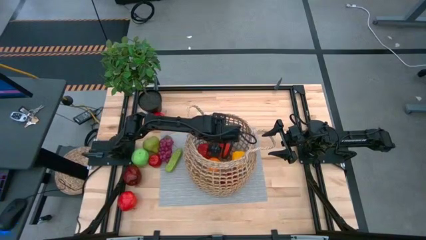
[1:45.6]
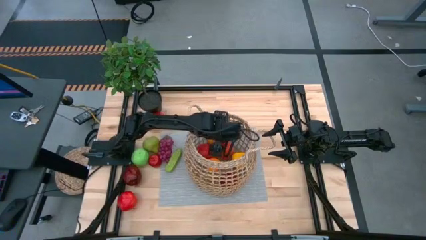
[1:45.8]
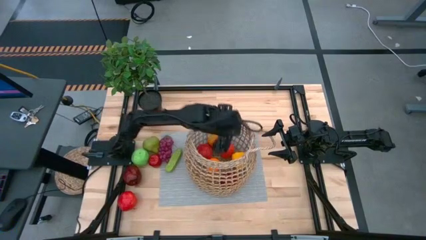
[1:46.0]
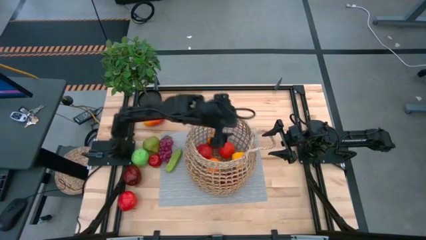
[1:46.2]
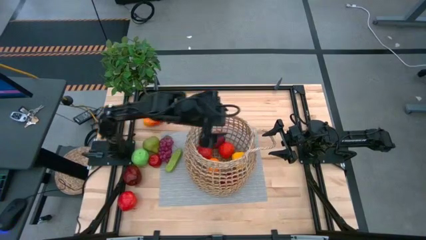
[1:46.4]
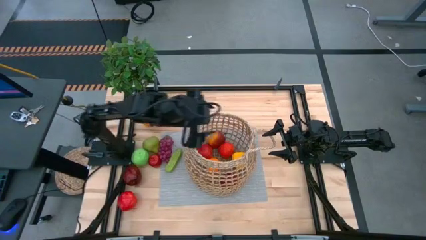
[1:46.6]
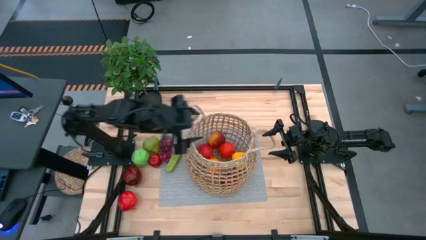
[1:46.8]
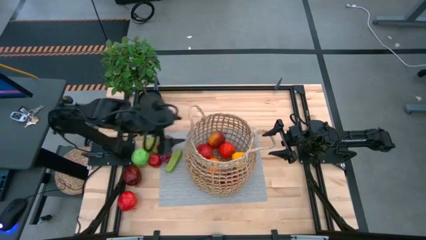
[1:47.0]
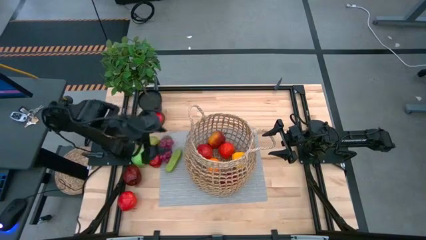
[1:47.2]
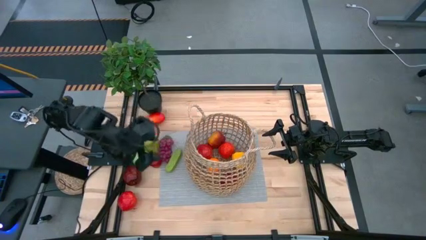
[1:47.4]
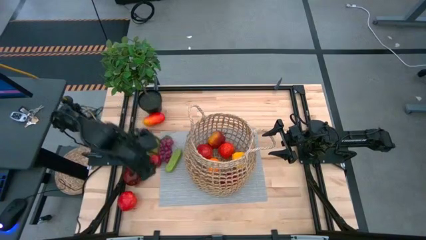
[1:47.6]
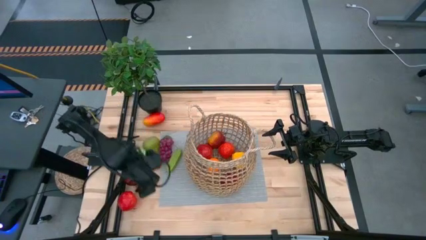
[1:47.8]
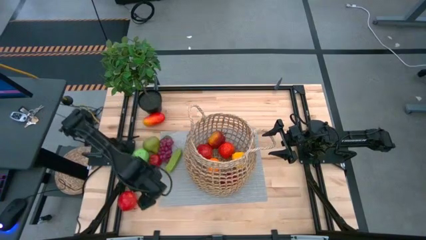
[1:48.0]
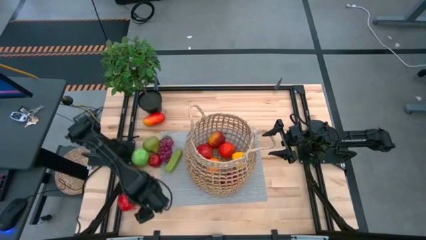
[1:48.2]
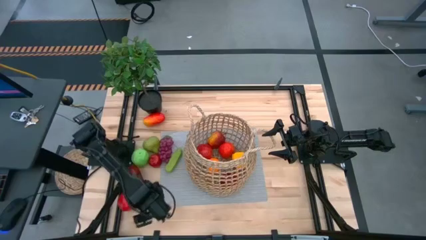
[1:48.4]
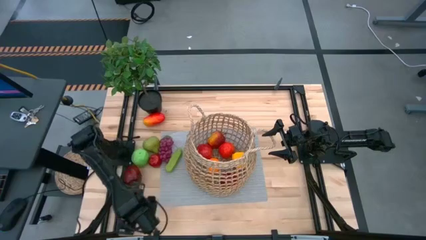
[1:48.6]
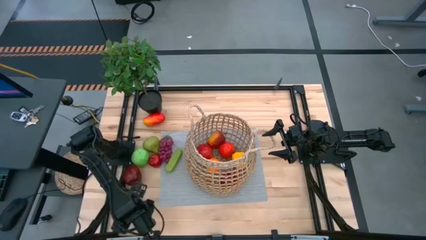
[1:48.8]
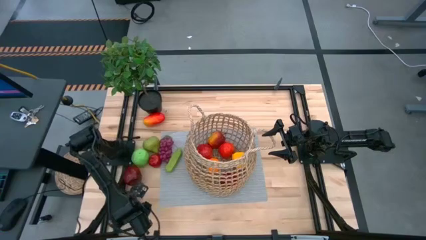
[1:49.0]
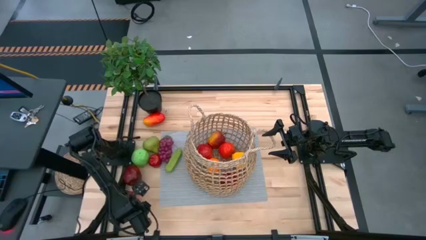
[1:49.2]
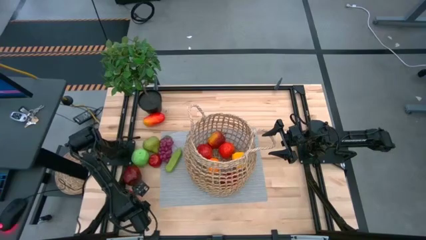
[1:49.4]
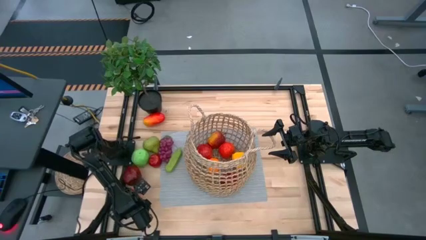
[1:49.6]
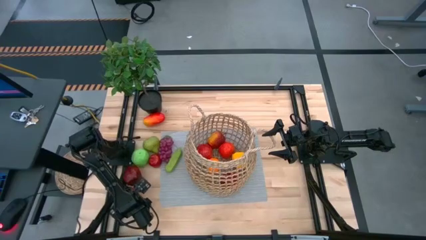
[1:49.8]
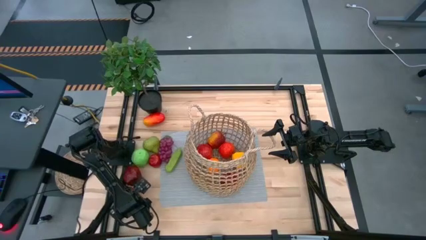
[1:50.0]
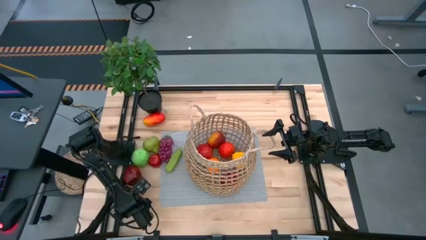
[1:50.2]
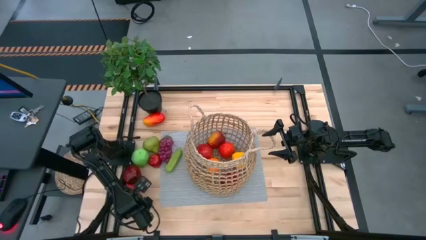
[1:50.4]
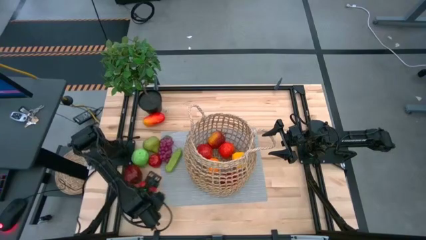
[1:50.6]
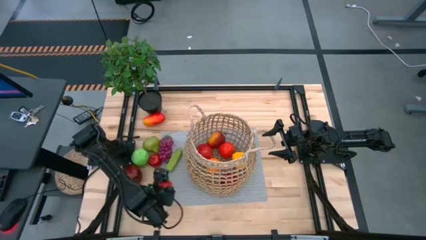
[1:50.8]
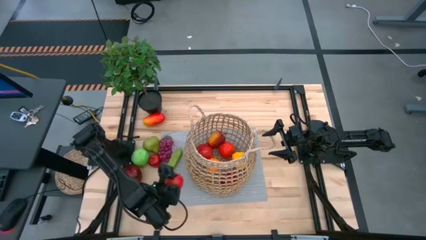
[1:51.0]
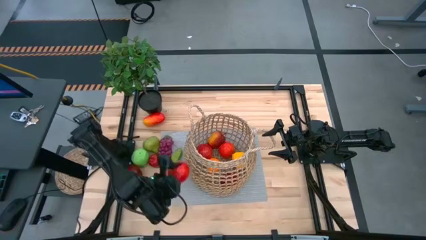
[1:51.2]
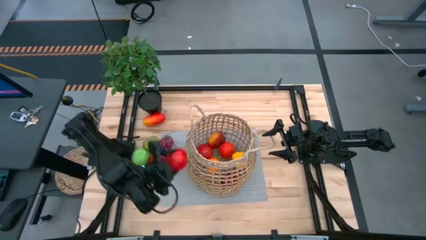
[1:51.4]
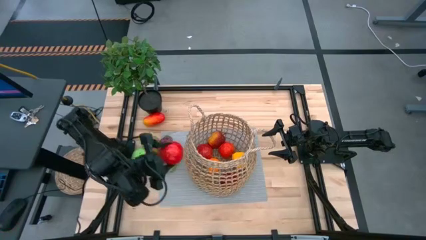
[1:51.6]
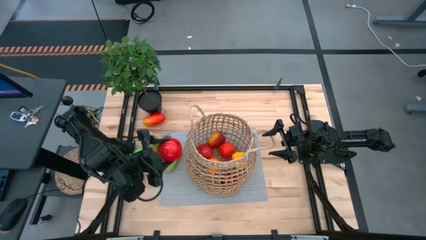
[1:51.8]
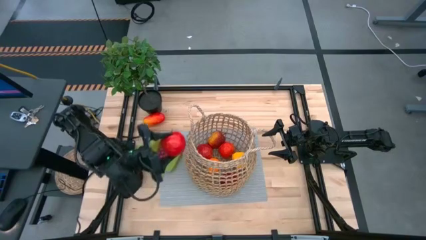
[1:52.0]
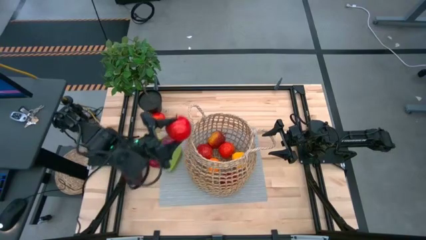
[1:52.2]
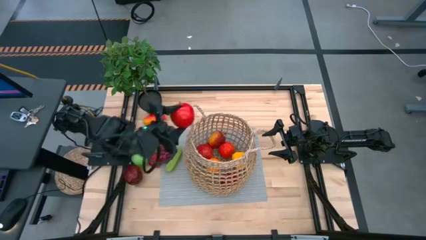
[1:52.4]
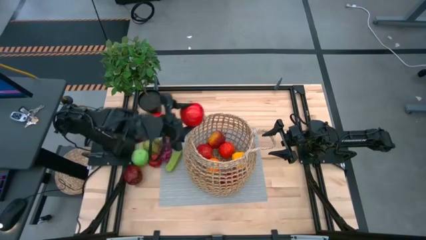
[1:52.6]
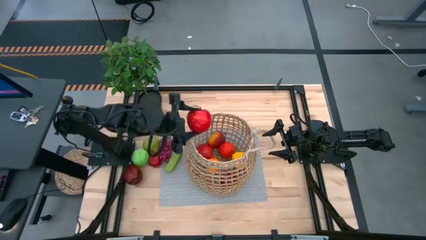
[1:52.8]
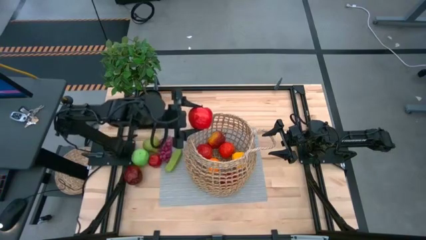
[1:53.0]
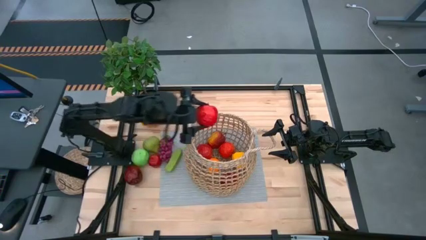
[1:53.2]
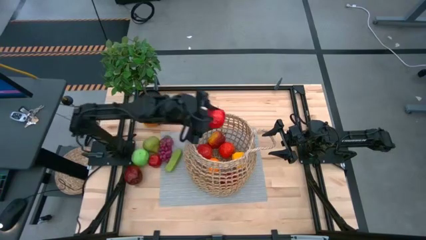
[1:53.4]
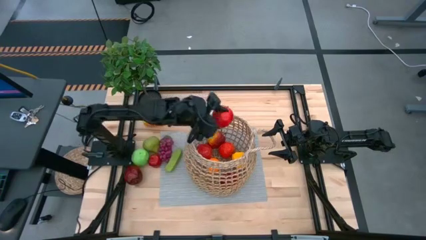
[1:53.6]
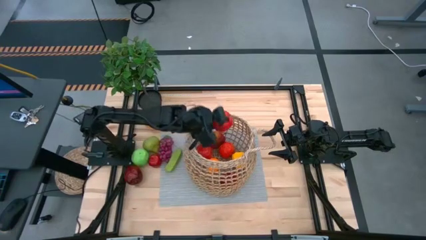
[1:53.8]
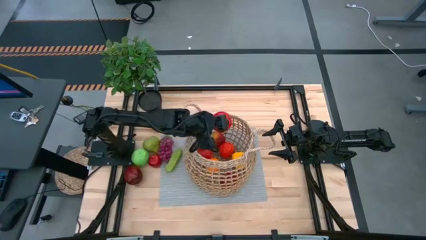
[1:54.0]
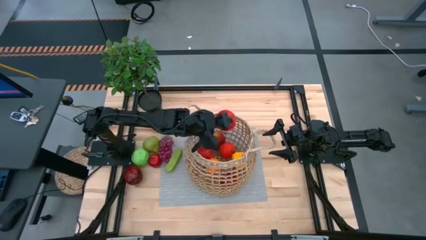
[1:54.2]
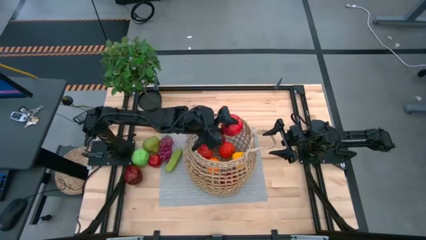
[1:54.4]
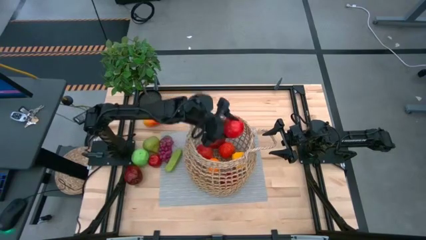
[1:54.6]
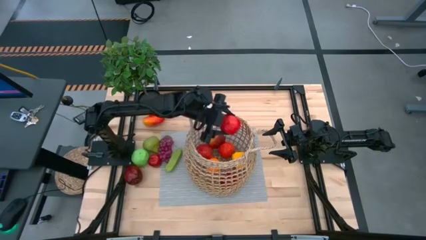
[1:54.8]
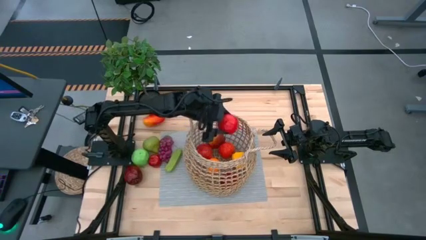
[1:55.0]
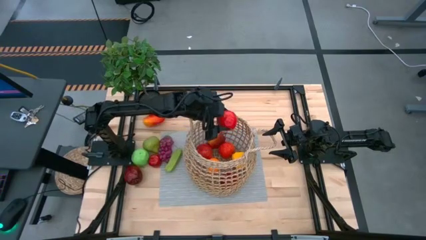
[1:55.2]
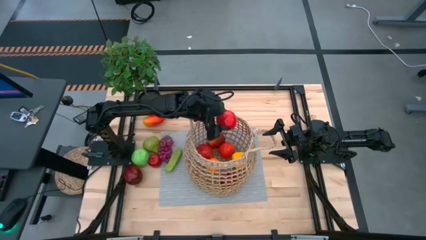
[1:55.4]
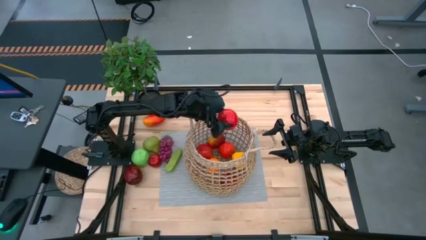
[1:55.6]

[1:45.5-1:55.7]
Task: Build produce basket
Put the red apple into the brown basket

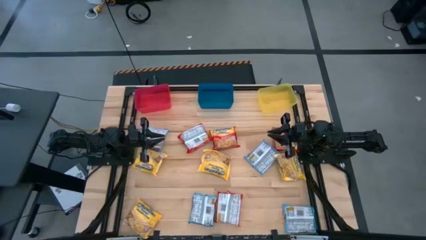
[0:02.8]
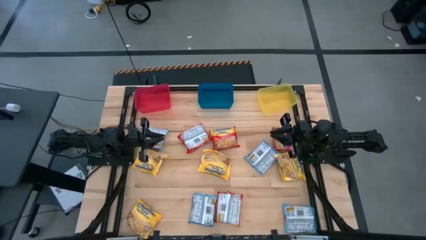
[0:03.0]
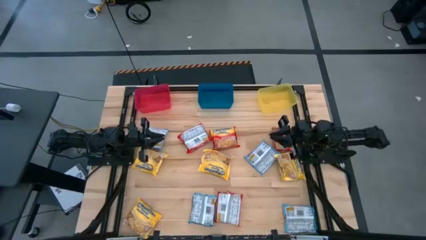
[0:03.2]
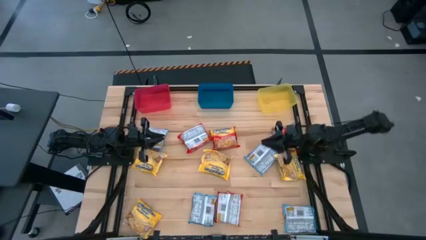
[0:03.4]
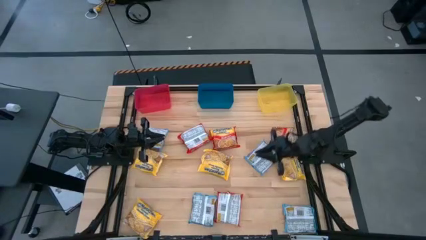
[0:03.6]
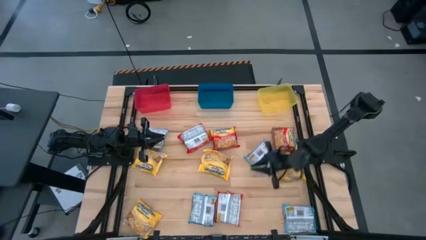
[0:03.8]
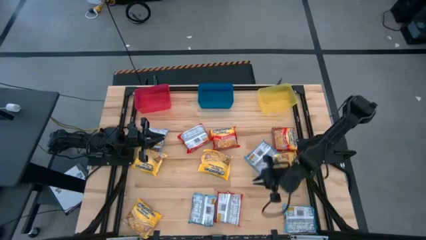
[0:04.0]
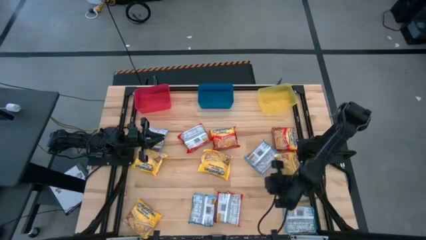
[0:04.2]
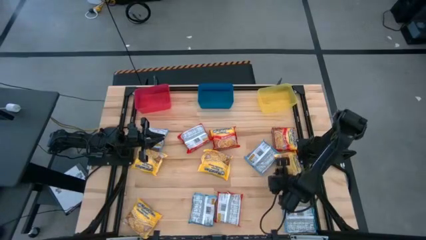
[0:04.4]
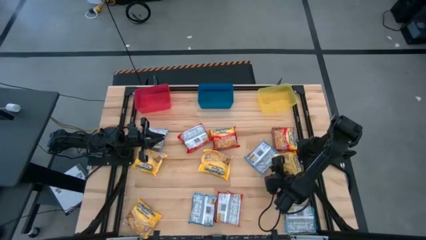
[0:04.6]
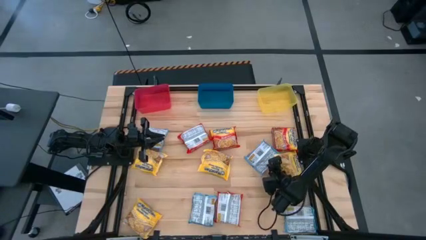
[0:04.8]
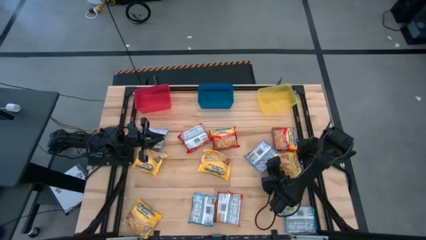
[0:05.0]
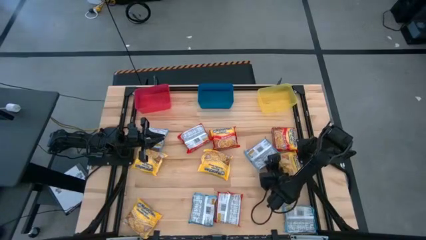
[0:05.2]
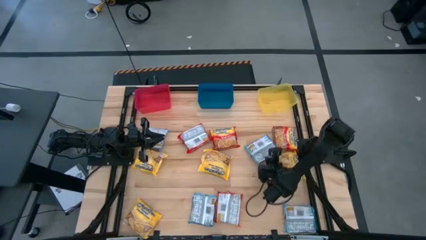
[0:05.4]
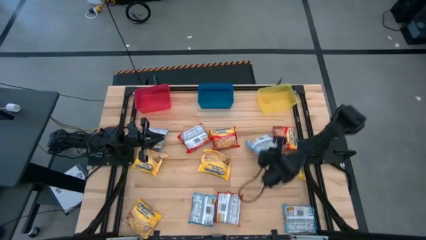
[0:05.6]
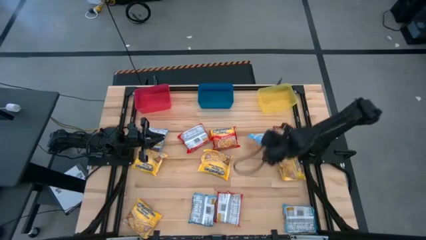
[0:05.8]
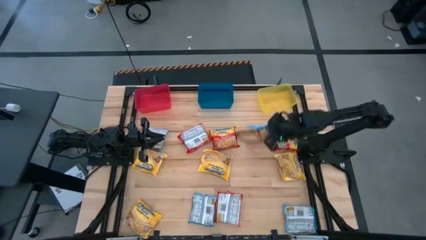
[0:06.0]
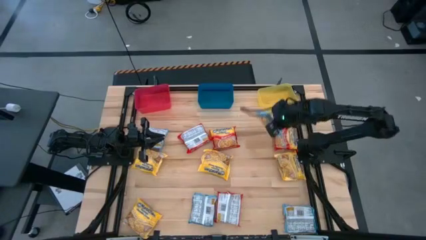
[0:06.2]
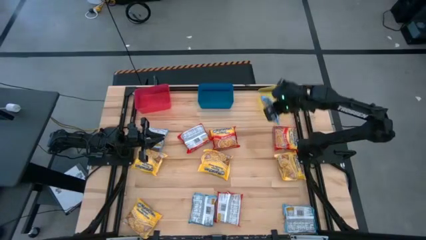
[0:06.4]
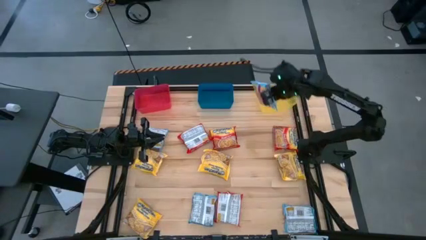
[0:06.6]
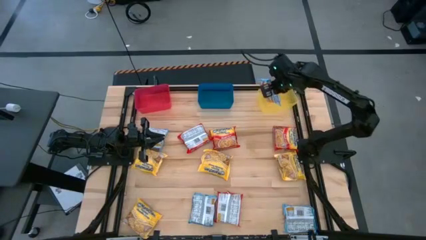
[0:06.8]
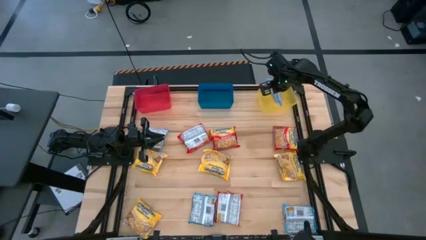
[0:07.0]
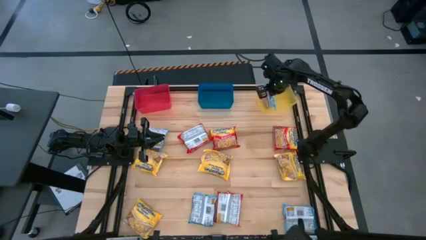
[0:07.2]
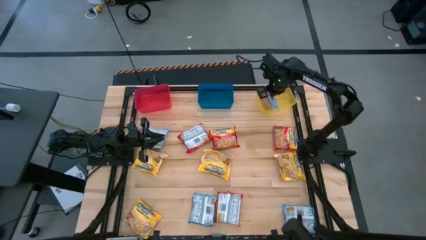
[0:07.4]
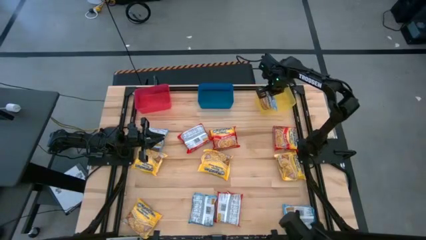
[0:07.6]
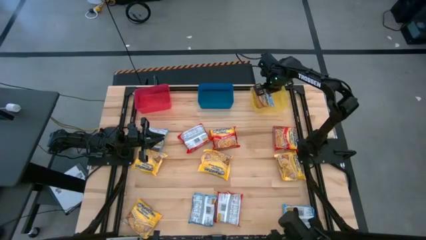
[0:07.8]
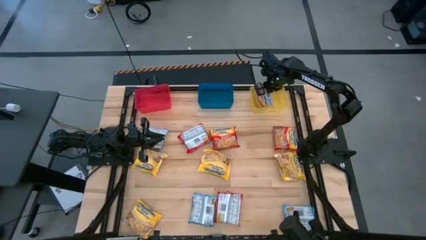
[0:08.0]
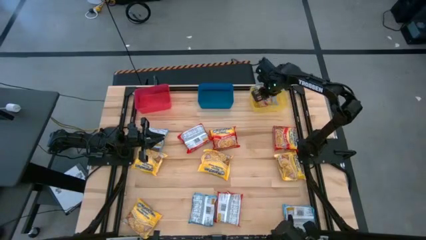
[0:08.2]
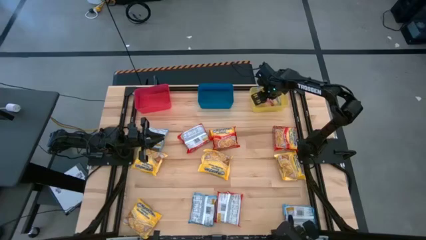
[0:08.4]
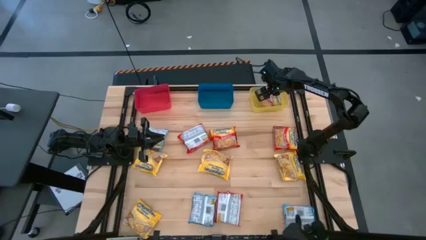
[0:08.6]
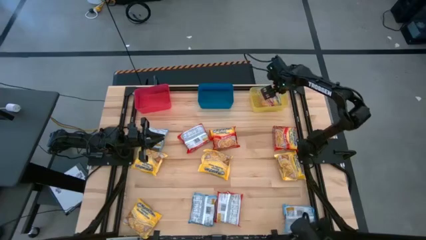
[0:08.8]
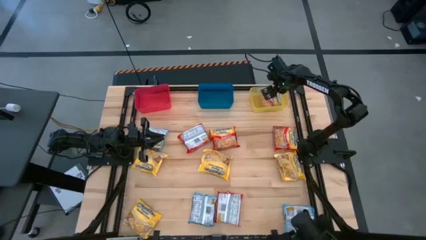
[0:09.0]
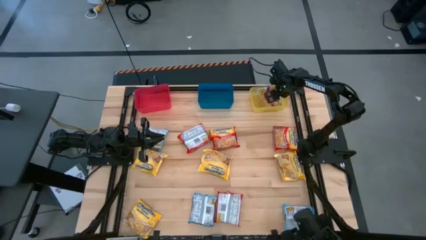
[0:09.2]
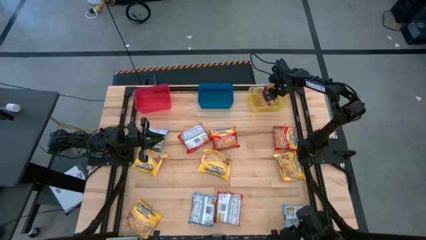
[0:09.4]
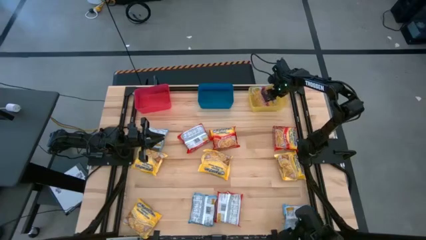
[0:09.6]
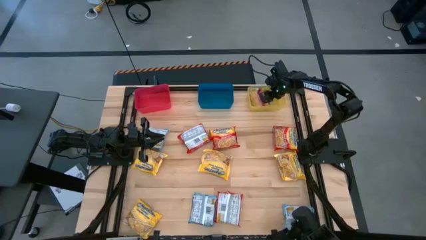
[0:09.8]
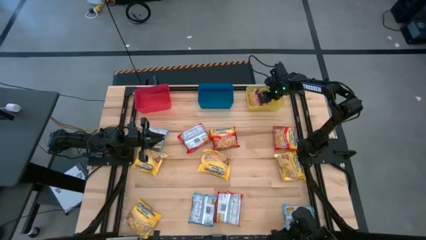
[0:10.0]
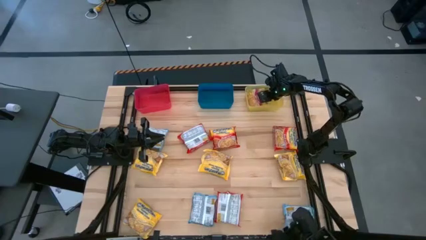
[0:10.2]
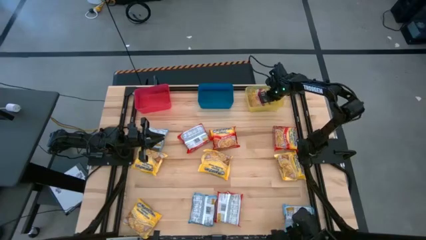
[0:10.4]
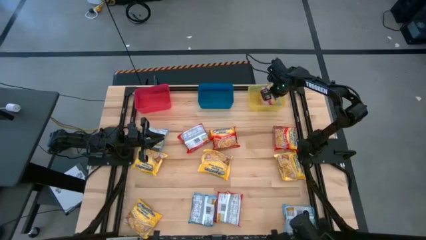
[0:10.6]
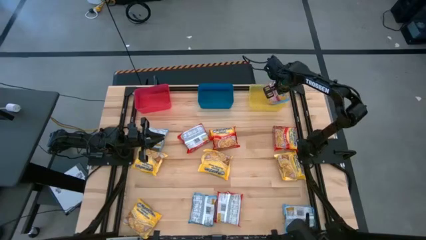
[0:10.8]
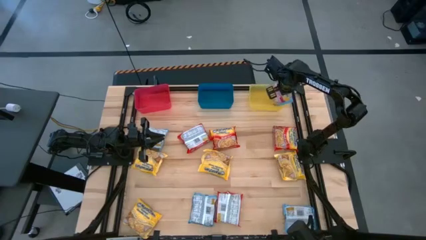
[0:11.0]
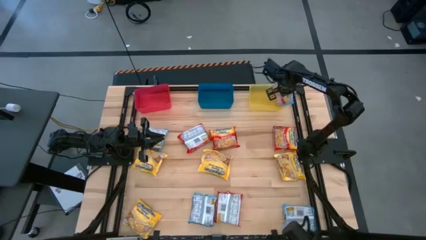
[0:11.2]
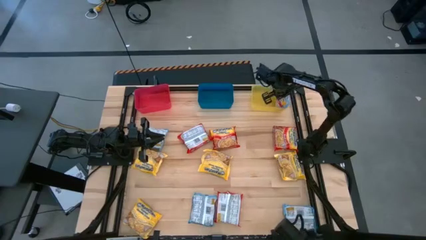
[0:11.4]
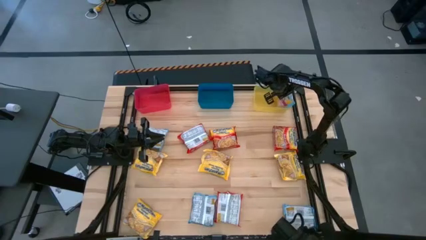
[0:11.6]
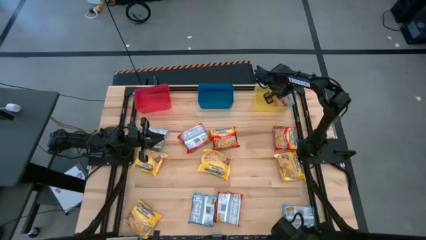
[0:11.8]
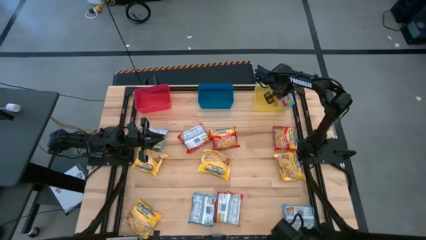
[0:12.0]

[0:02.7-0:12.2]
Task: Sort Maruchan noodles
Put the blue noodle pack into the yellow bin
